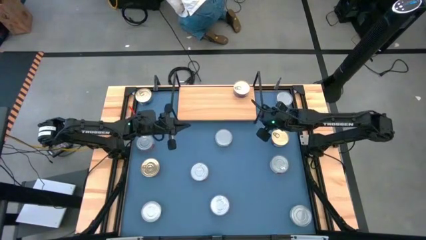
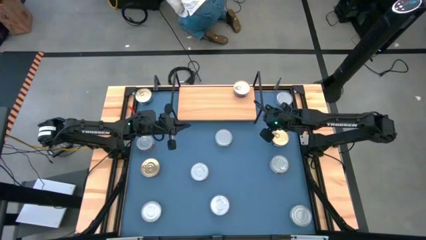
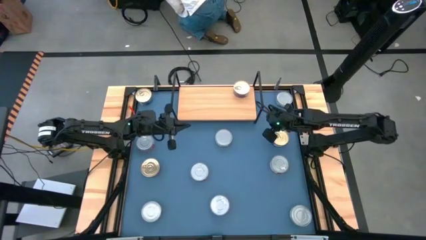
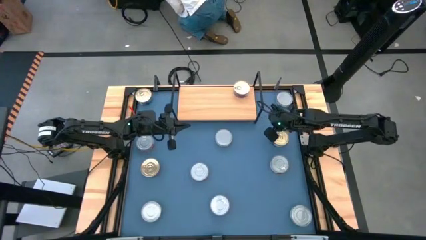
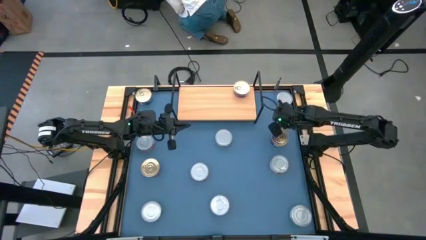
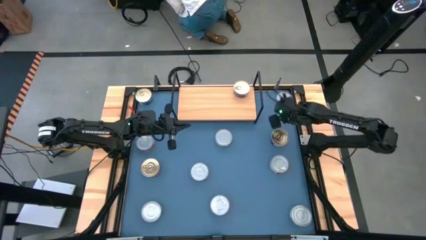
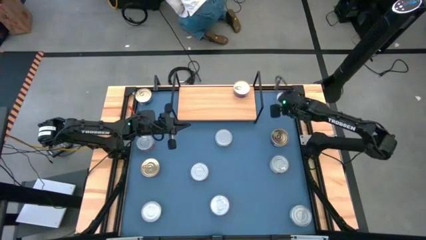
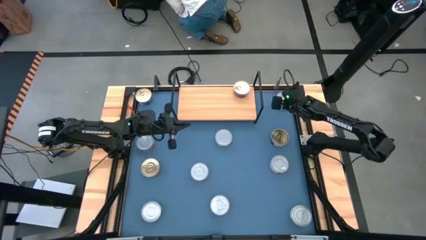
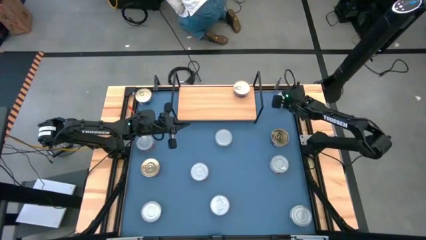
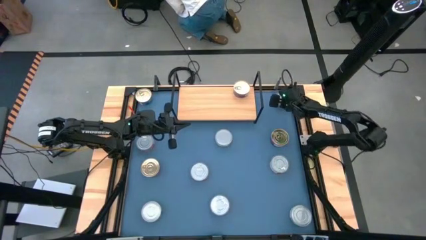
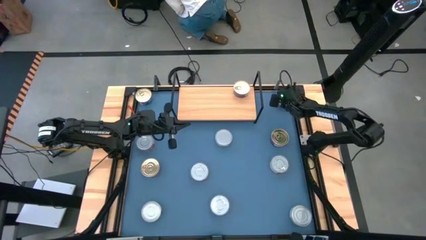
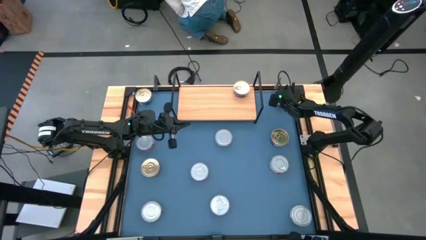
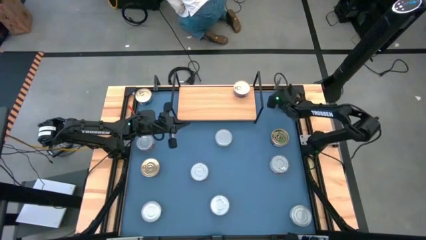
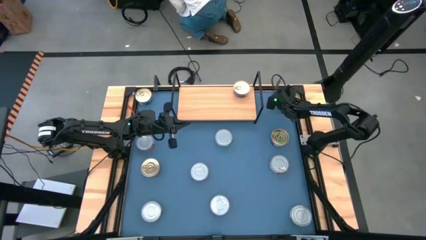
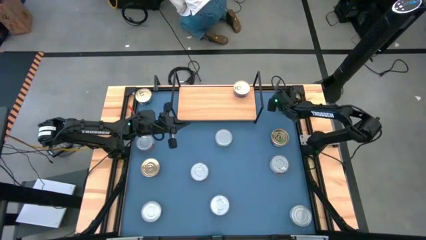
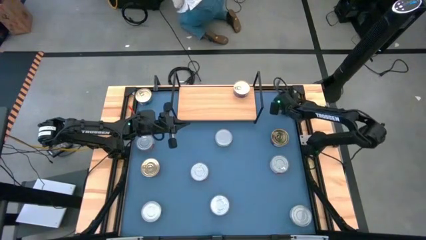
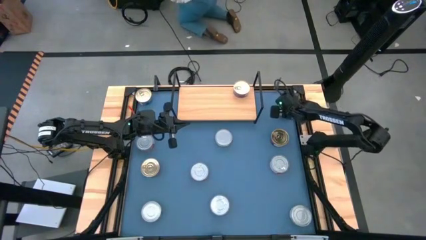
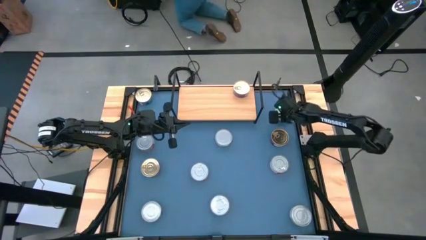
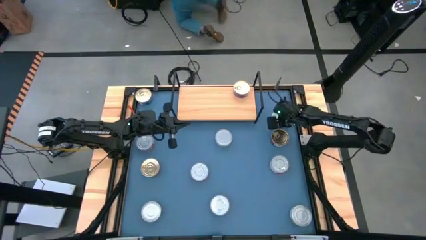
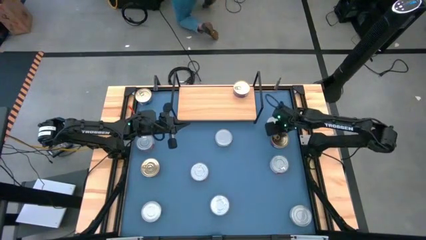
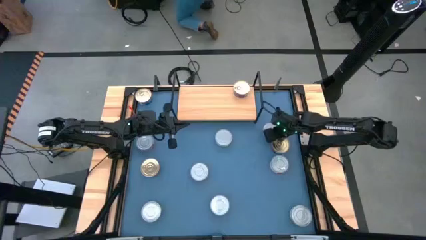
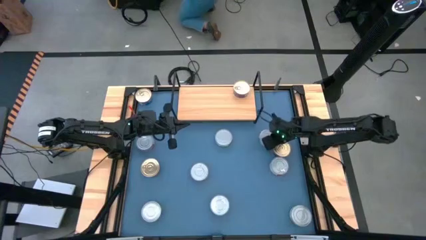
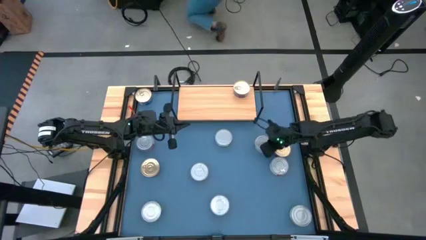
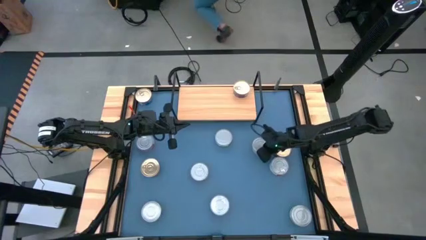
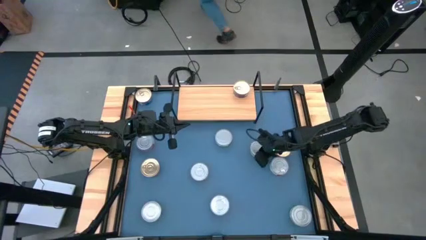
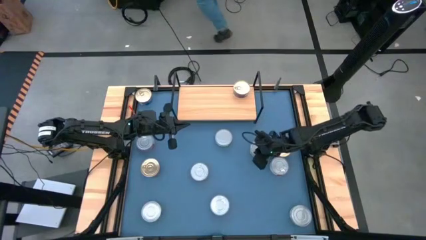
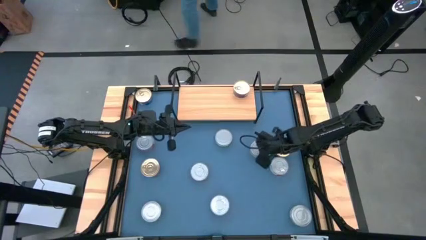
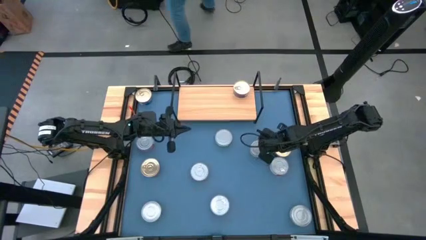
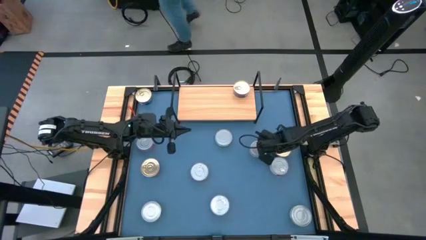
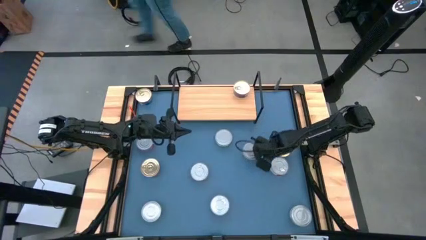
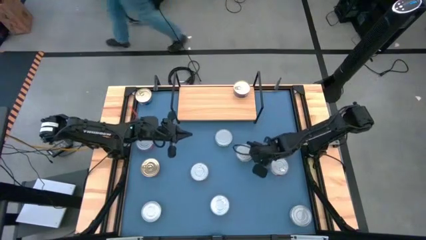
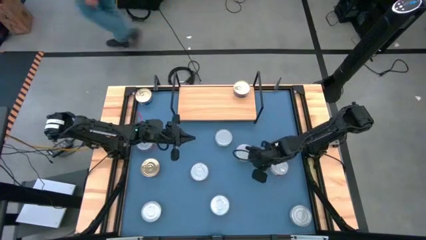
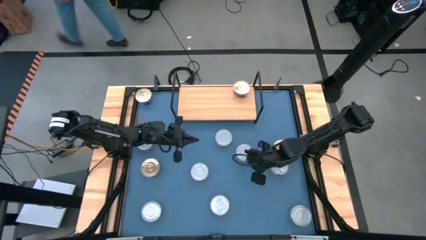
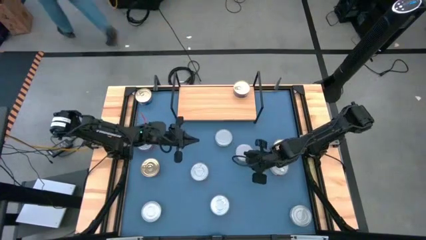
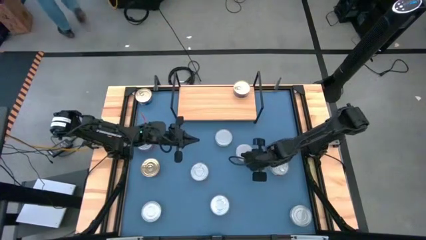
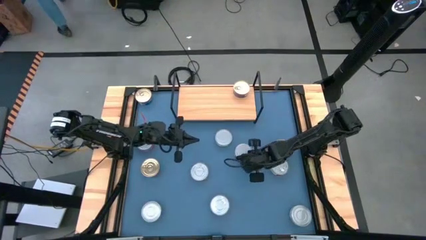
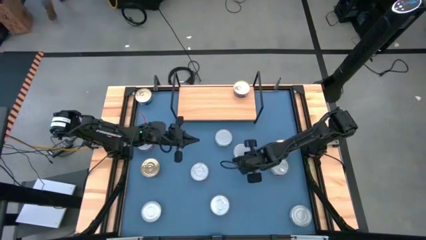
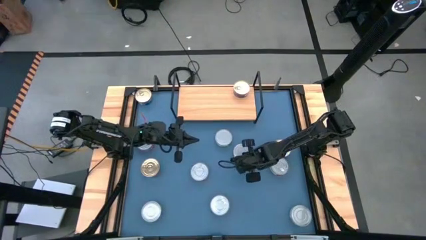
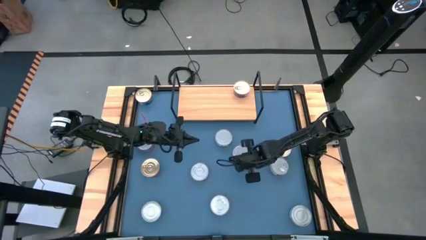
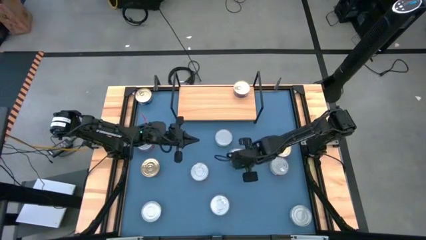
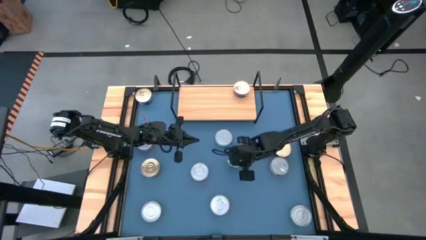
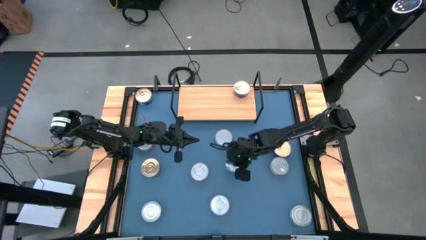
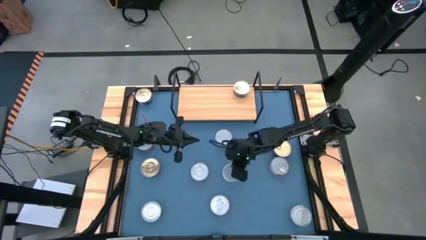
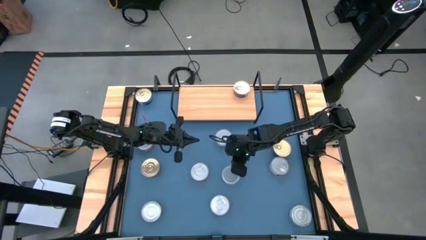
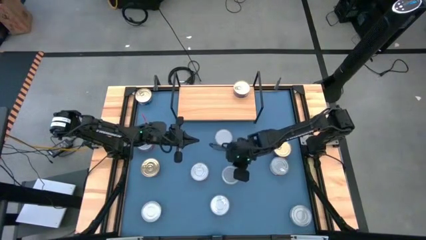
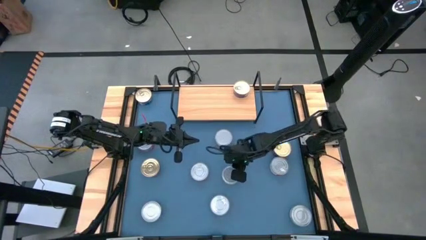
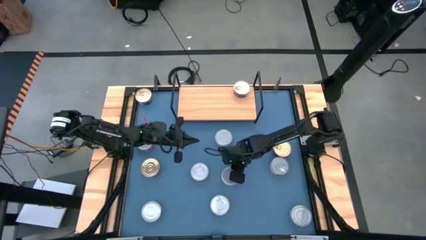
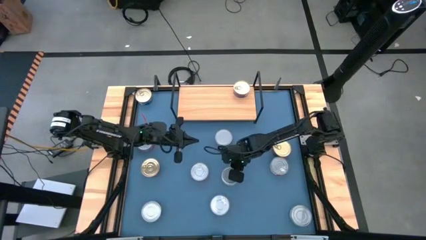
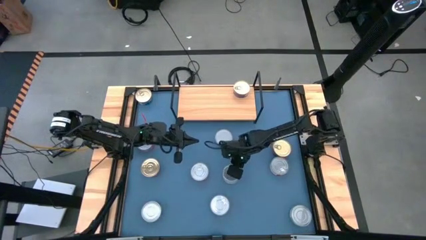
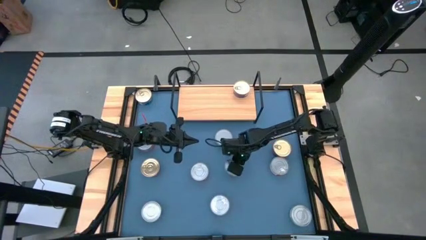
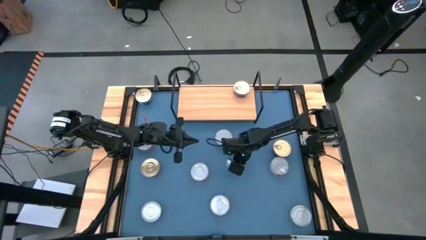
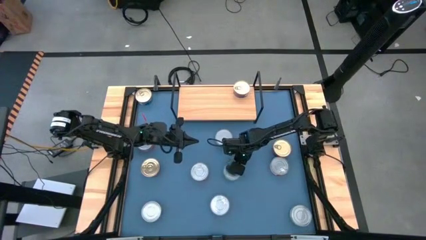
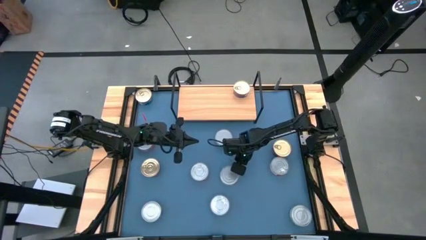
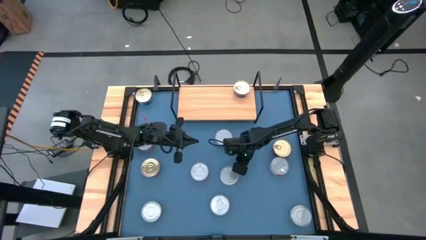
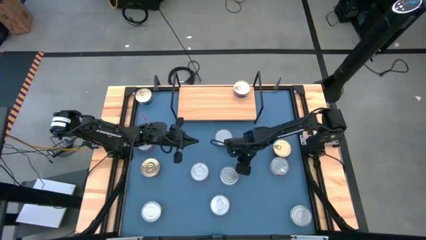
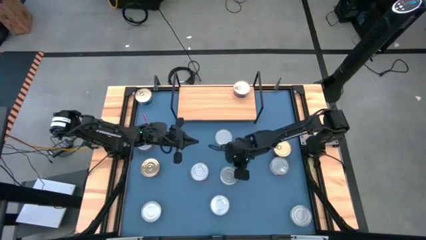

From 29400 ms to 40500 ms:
Task: Stack canned seafood by type on shelf
Put the green tuna can on the shelf

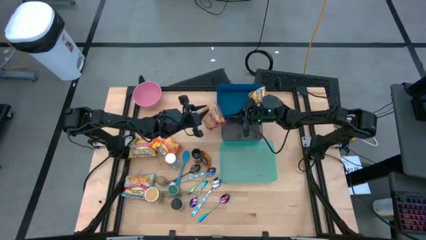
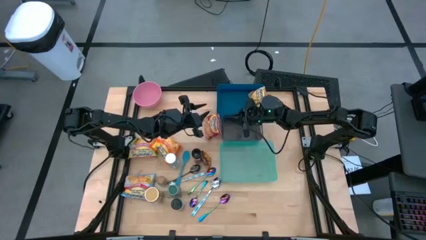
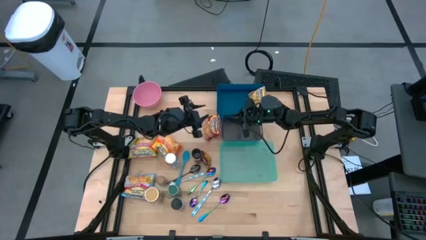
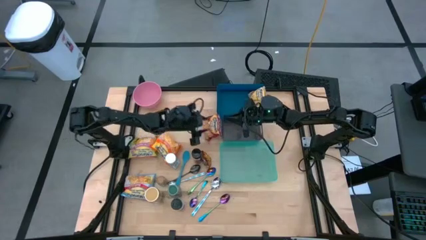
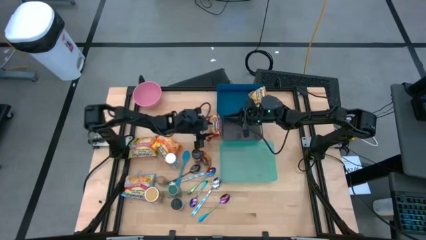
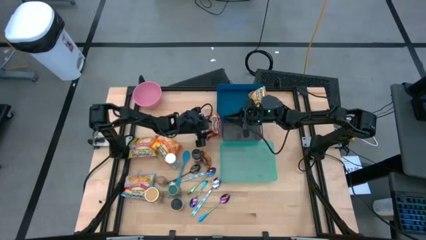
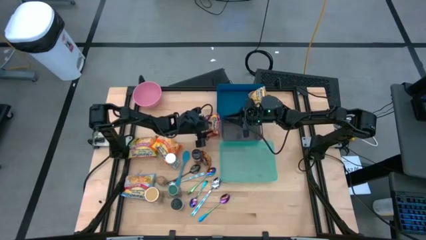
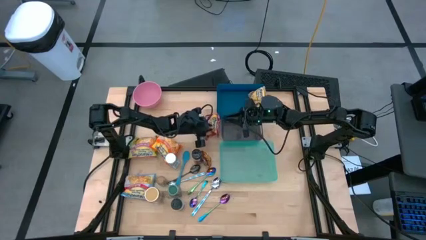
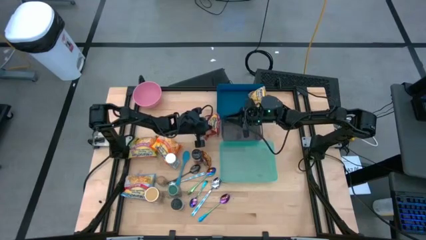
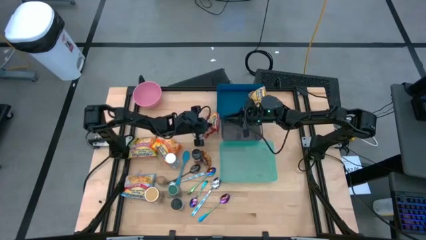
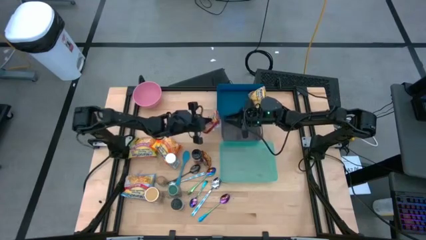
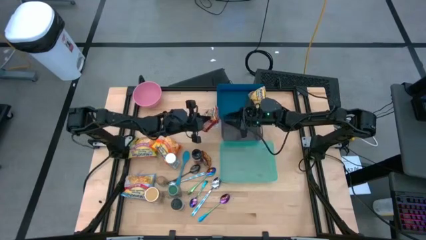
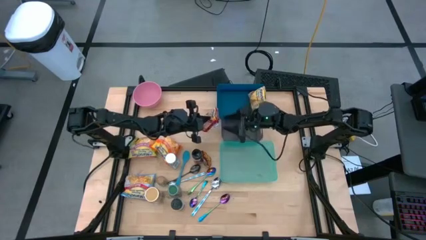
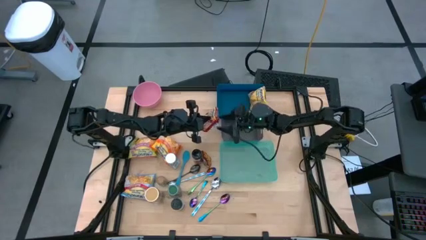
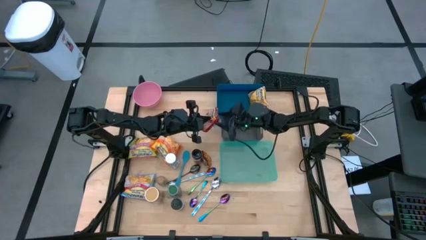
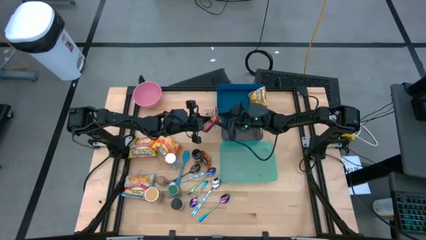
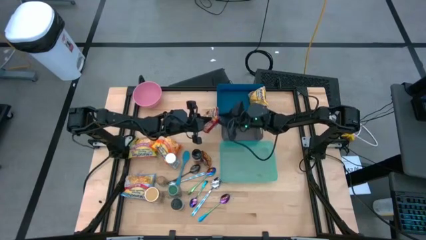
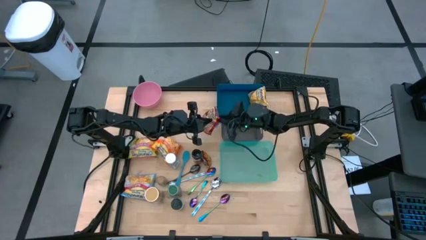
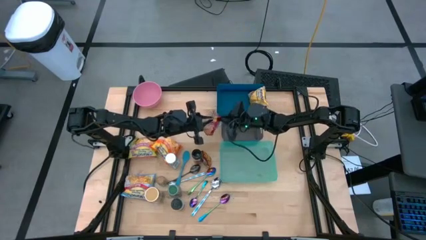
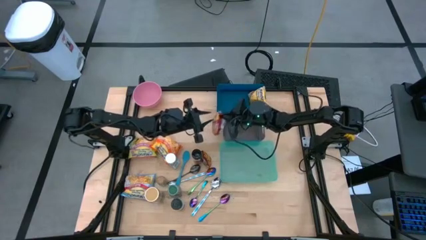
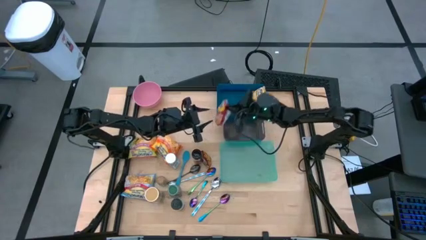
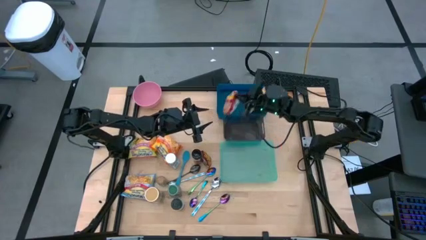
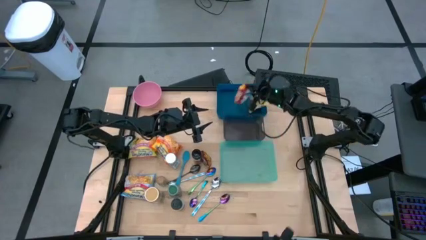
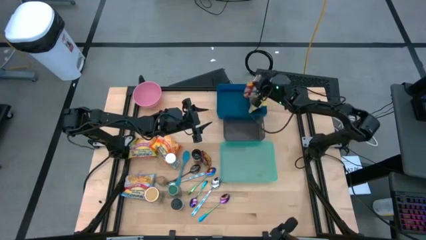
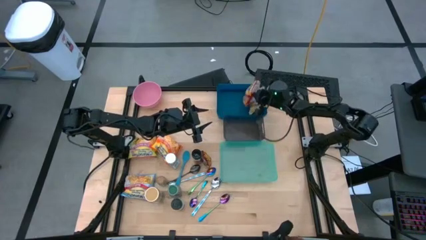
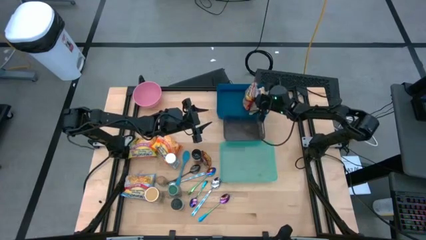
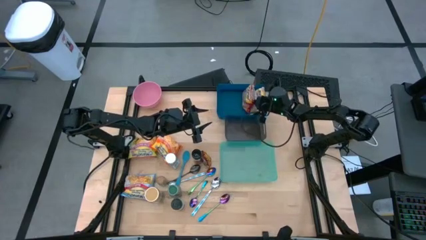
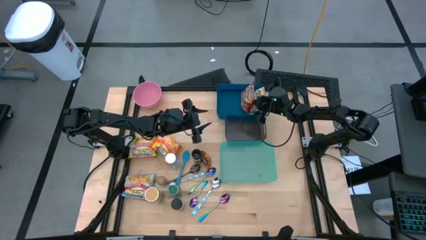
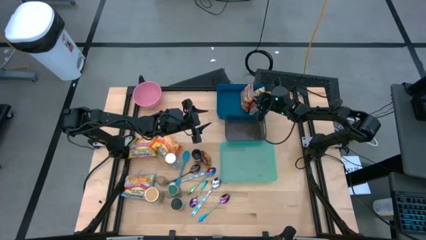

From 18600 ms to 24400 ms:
Task: Pick & Place Food Item
Put the red noodle pack into the blue bin
